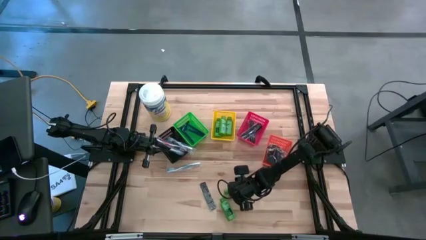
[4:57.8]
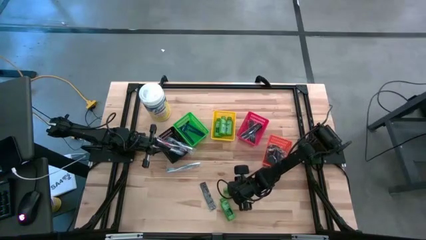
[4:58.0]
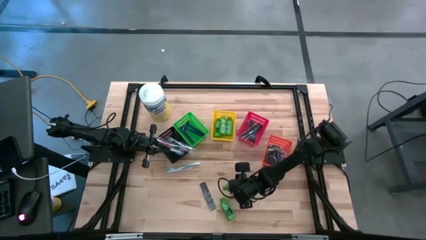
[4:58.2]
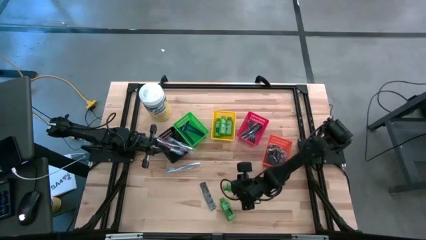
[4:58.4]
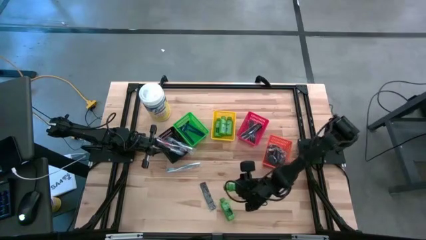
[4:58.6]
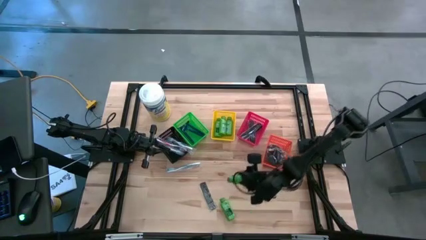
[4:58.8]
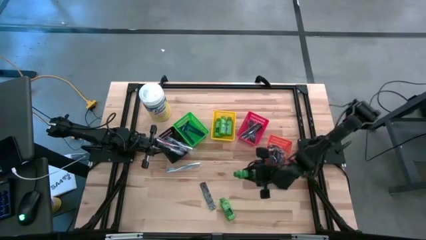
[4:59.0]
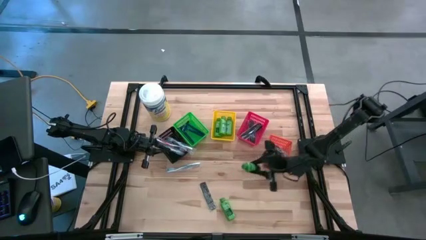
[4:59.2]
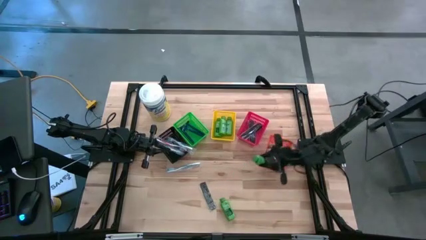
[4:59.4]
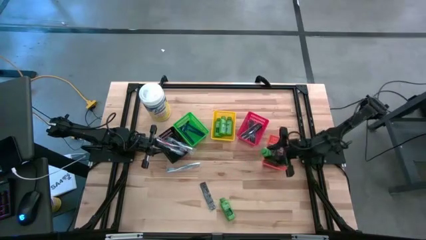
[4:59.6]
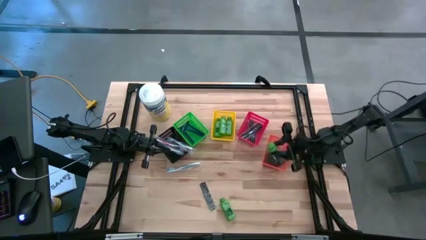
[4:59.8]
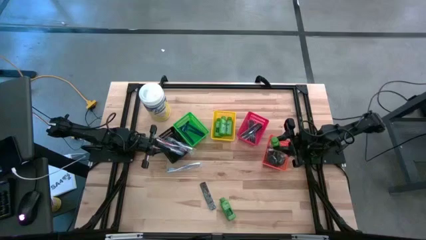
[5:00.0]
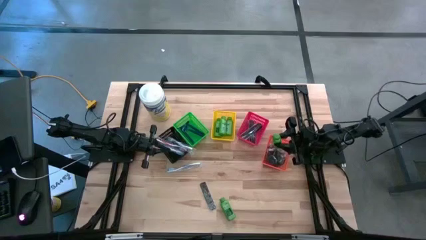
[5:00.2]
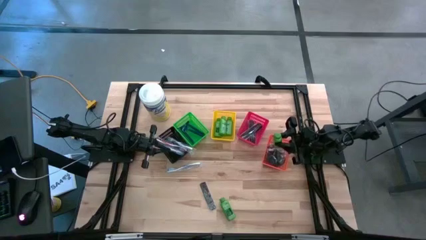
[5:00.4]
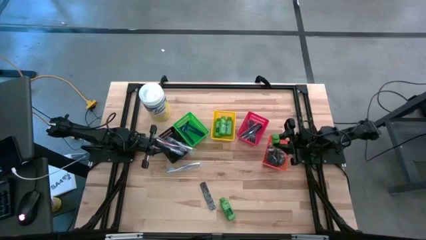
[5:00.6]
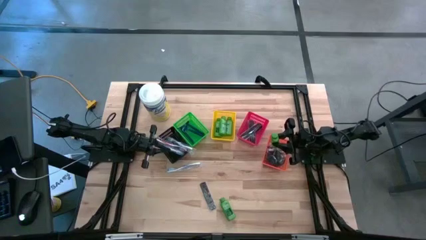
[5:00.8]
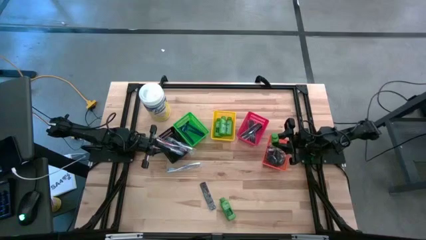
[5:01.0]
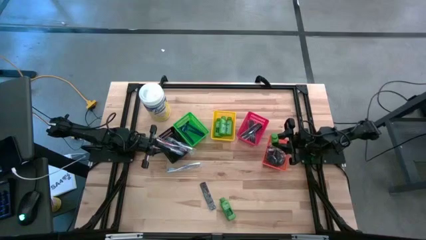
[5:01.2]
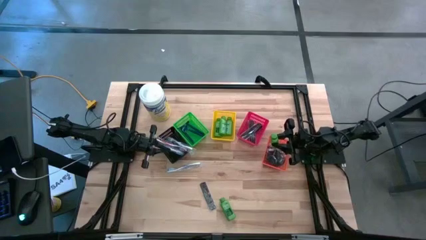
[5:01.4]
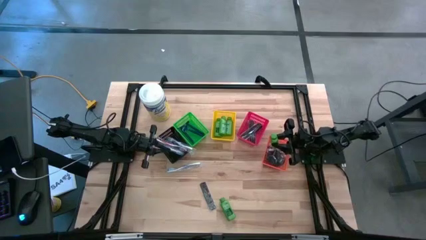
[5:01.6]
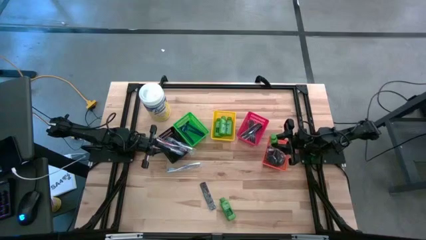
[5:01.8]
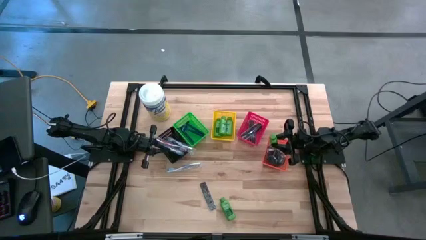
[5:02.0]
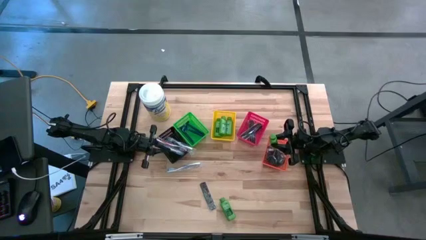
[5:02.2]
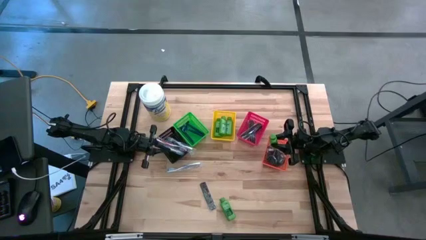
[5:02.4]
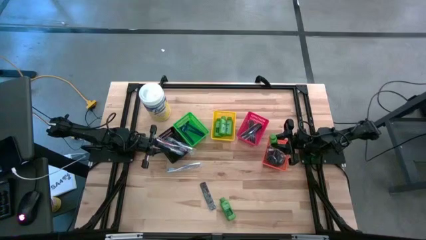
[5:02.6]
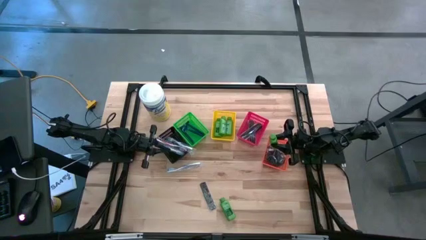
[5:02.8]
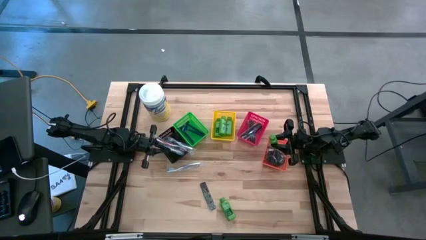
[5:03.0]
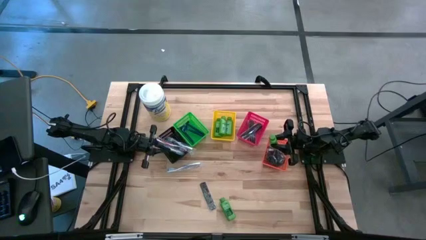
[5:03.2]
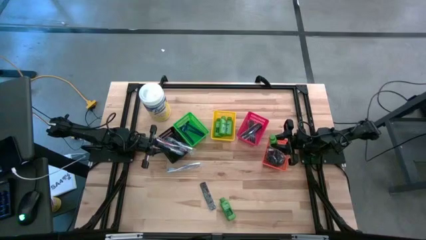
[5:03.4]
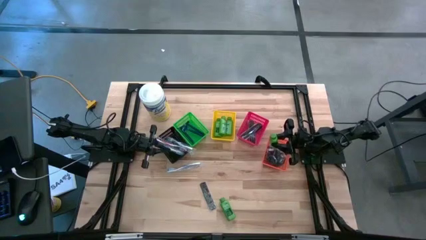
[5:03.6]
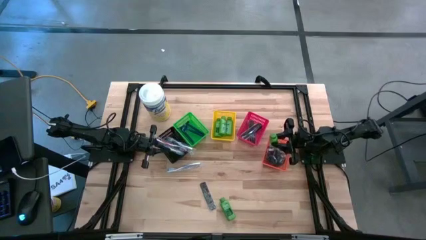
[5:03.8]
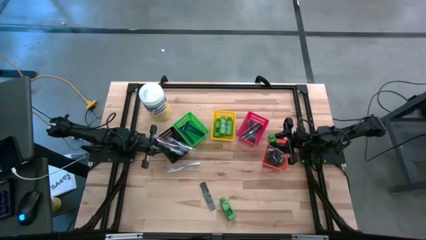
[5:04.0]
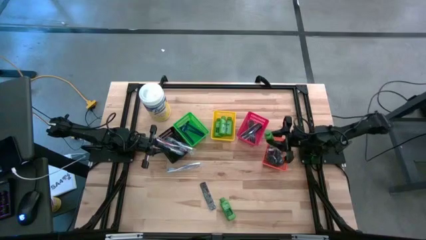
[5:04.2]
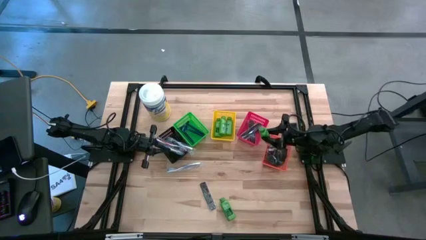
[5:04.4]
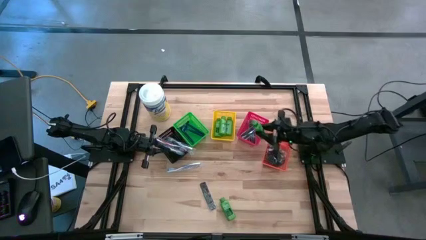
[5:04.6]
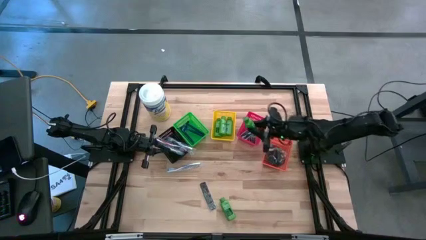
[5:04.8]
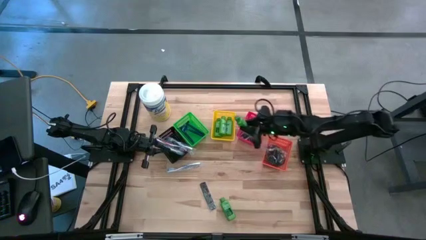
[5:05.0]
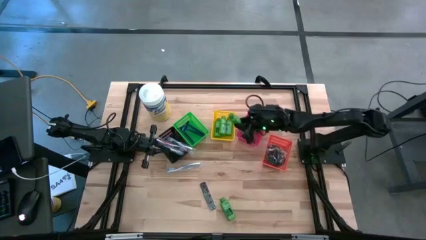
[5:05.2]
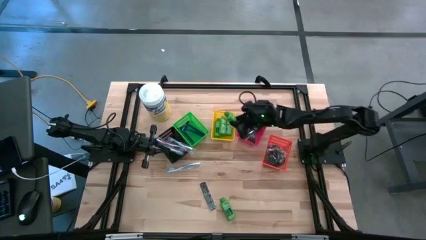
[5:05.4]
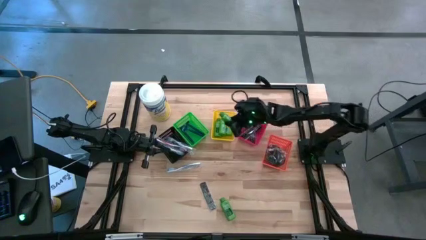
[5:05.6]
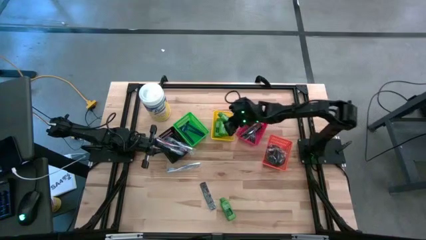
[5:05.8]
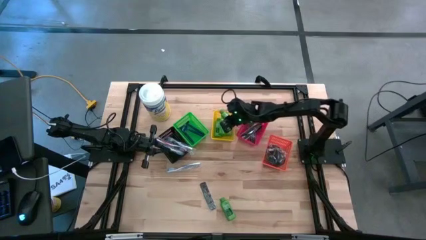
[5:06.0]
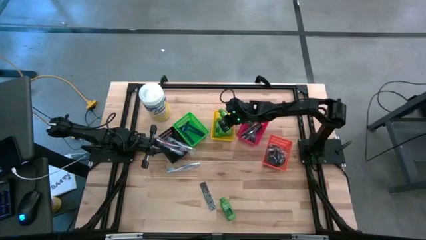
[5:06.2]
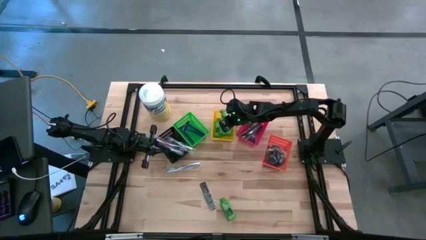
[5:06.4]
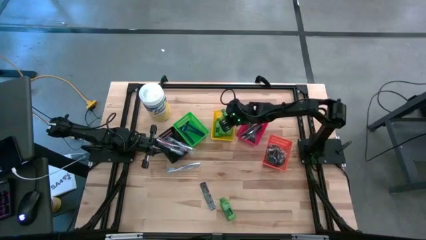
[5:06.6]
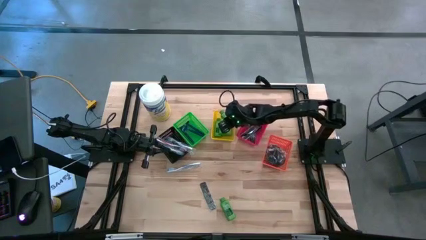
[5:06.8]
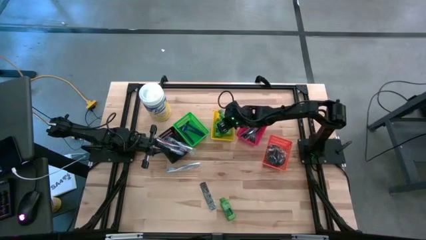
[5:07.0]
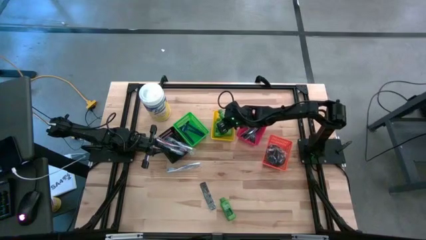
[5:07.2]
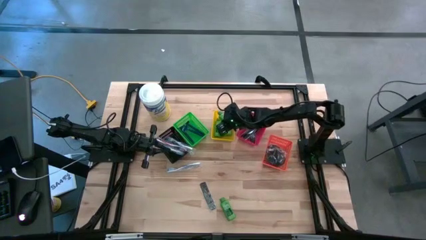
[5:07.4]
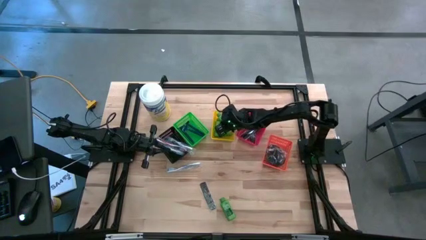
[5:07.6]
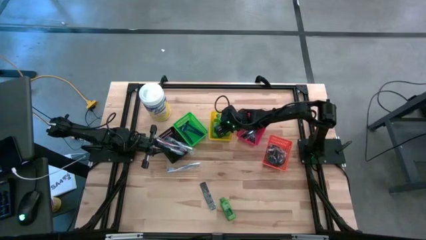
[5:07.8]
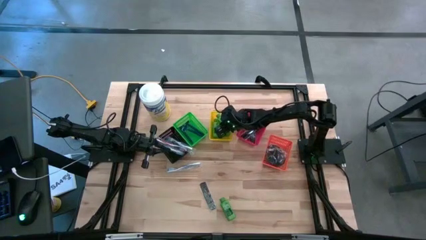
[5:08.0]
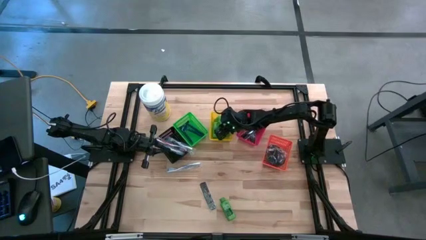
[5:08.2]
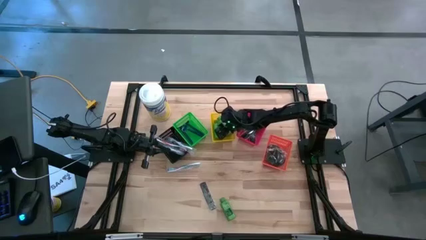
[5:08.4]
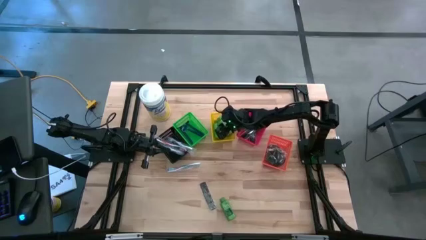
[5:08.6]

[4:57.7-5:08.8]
Task: Pick & Place Travel size toiletries
Put the right green bottle shampoo into the yellow bin
